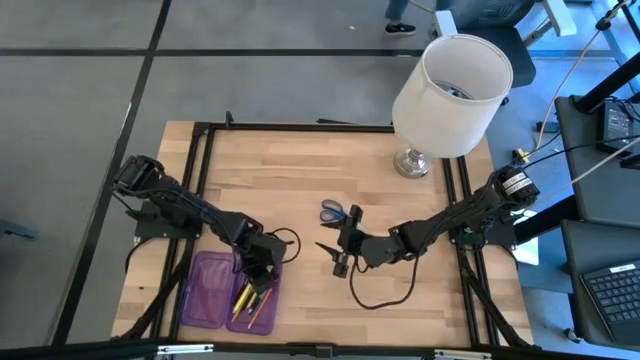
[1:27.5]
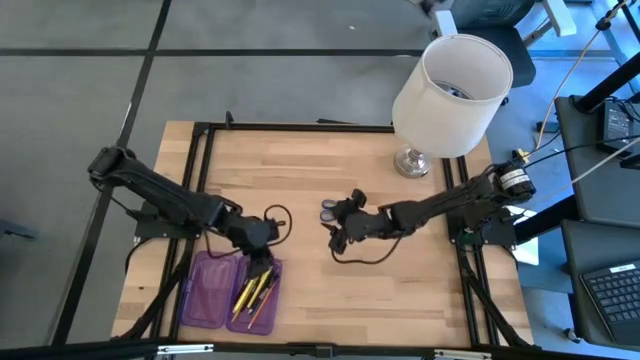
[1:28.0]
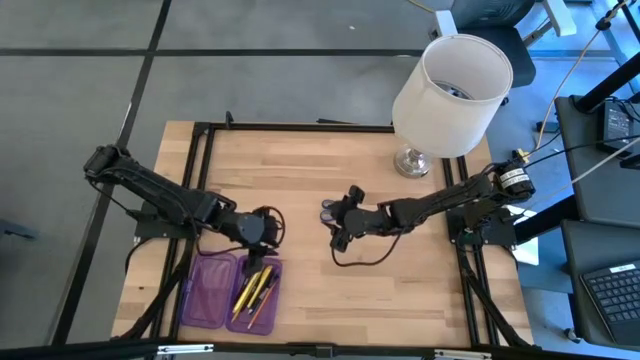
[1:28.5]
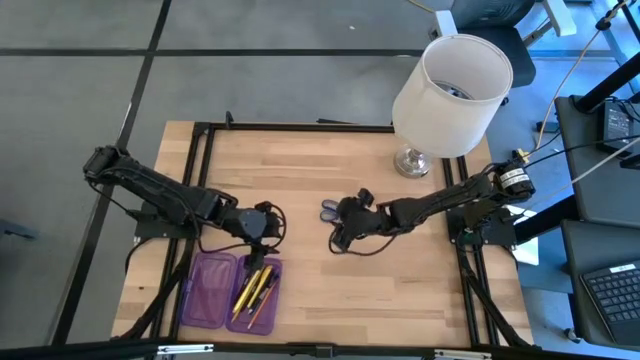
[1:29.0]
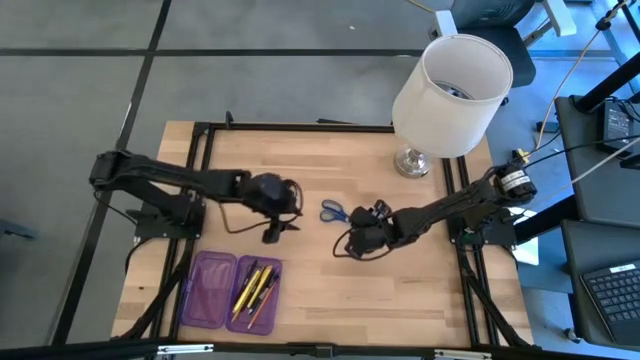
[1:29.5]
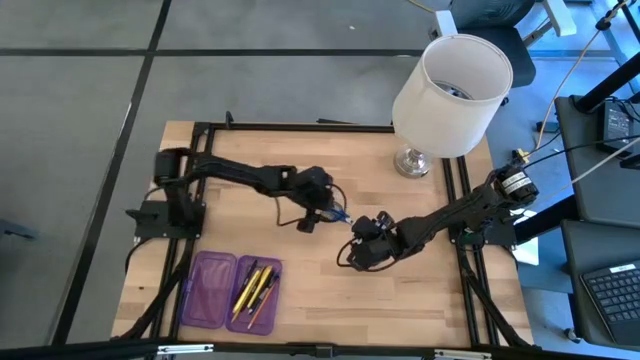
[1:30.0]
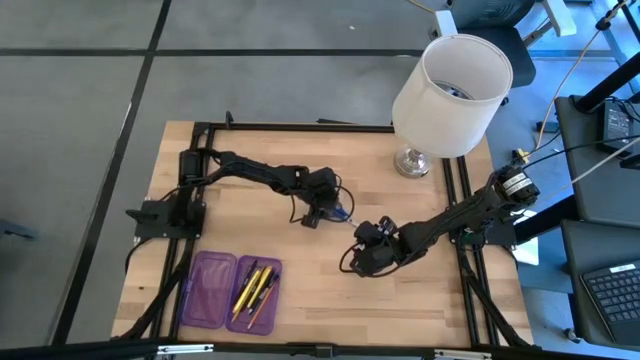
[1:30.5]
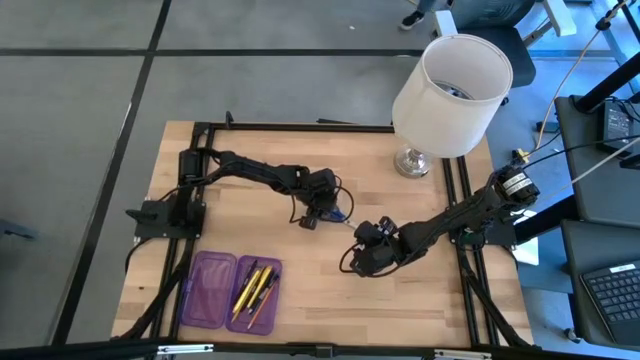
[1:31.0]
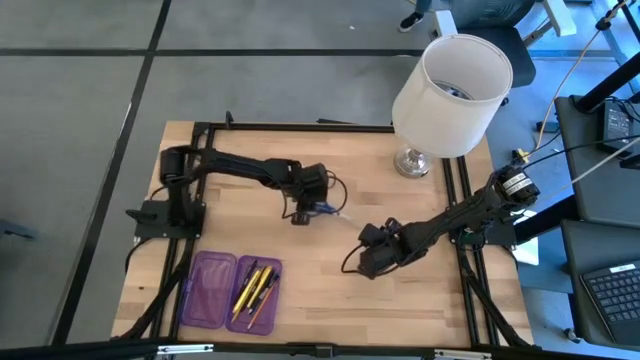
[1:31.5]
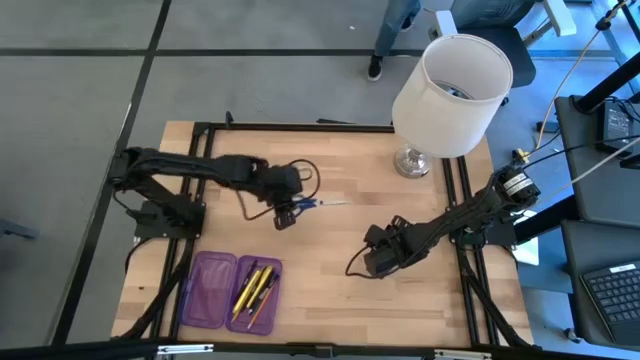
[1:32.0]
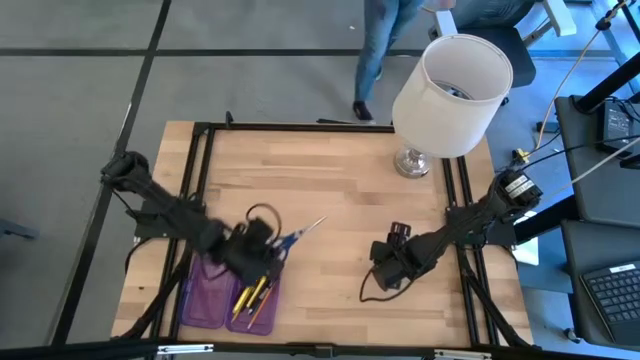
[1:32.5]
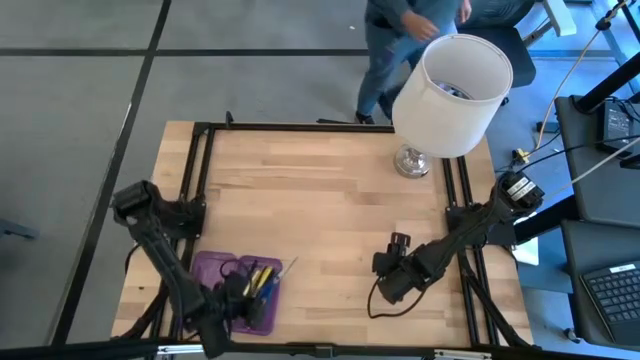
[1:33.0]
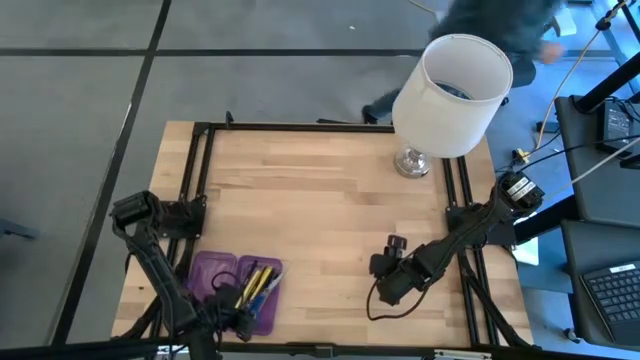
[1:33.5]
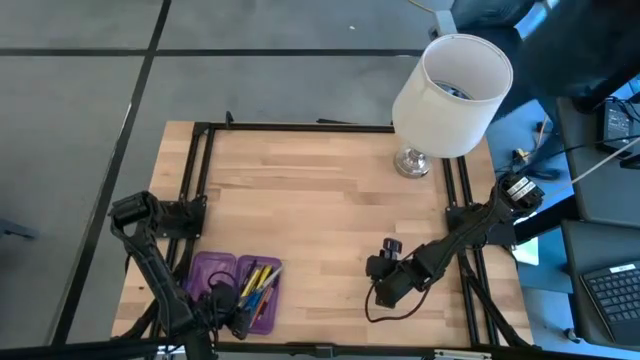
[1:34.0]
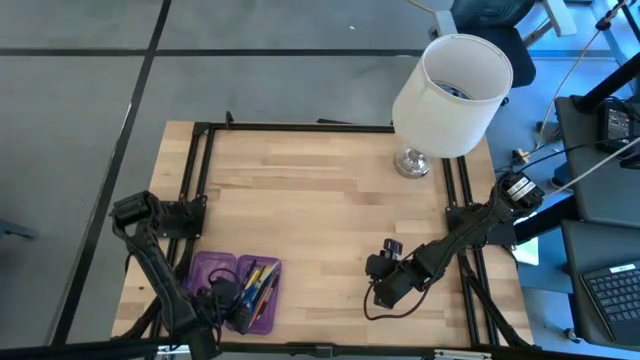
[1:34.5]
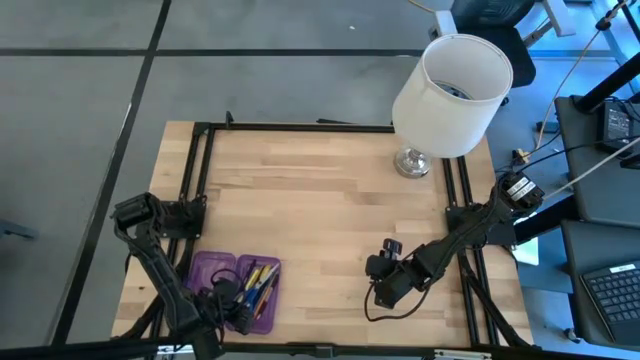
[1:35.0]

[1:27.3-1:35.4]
Task: Pick & place school supplies into a supply box
Put the blue scissors into the violet box

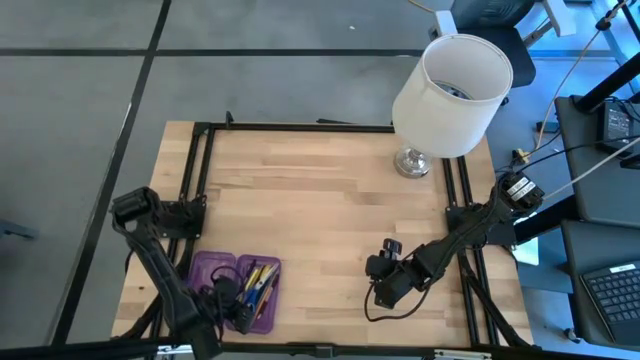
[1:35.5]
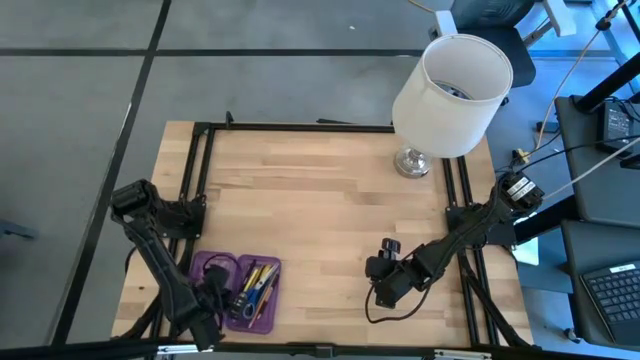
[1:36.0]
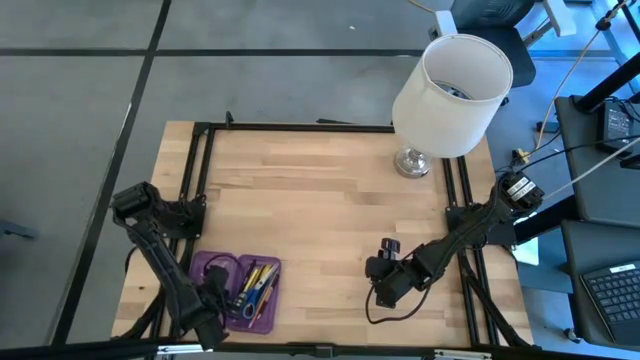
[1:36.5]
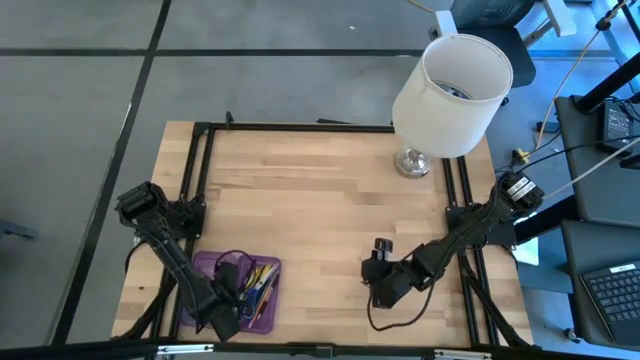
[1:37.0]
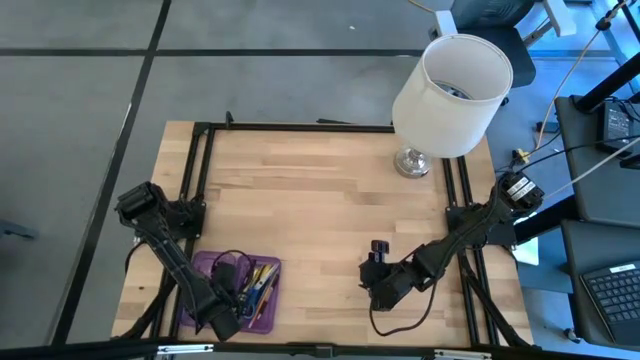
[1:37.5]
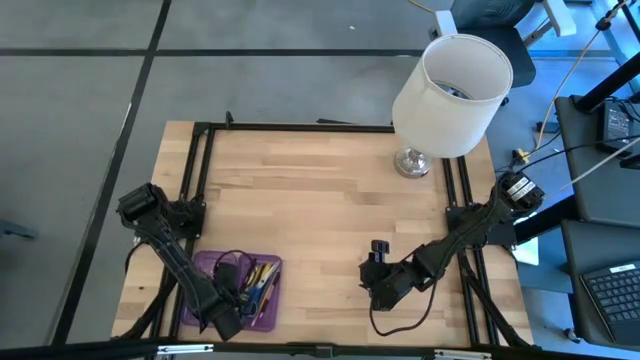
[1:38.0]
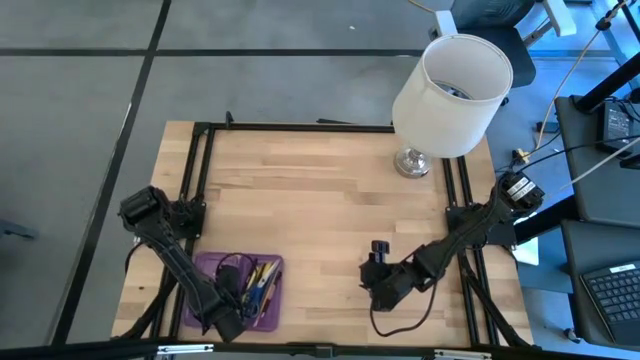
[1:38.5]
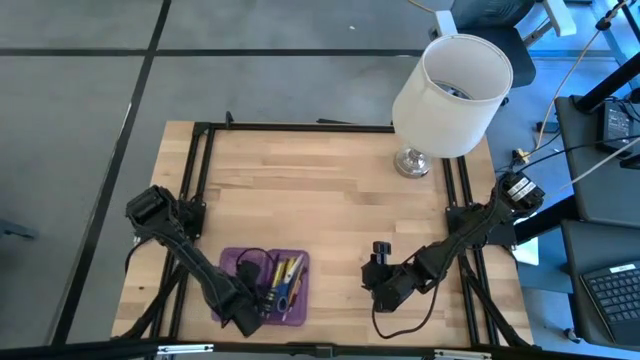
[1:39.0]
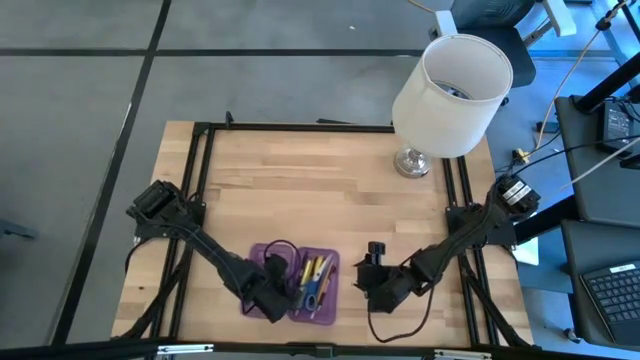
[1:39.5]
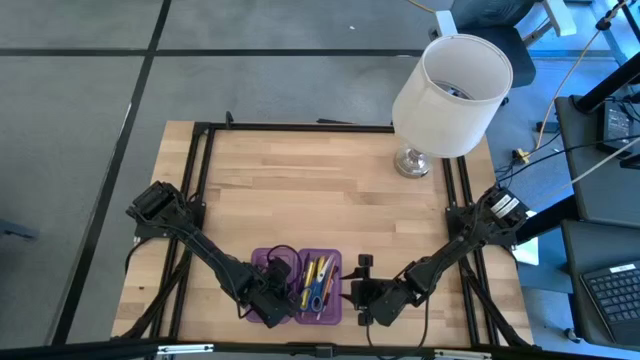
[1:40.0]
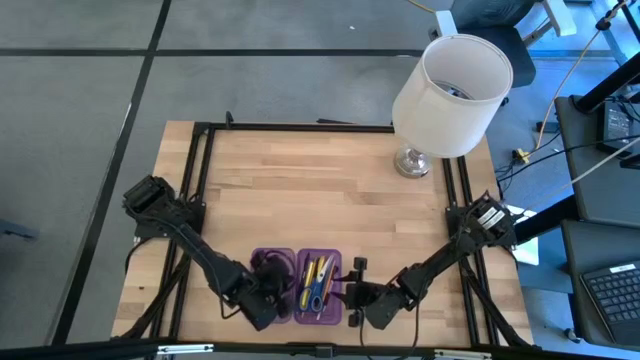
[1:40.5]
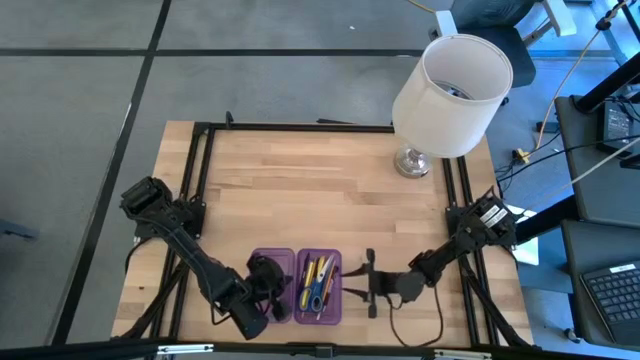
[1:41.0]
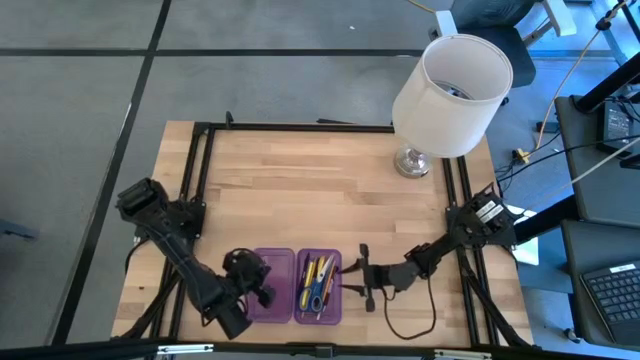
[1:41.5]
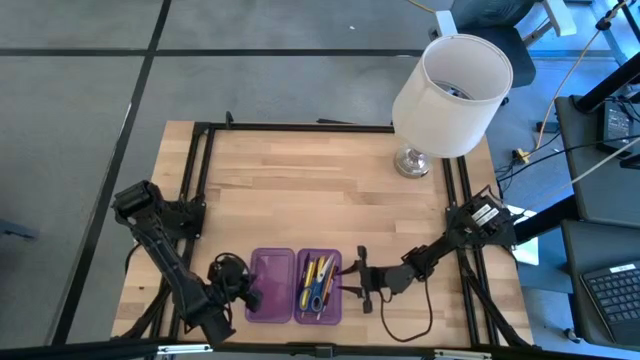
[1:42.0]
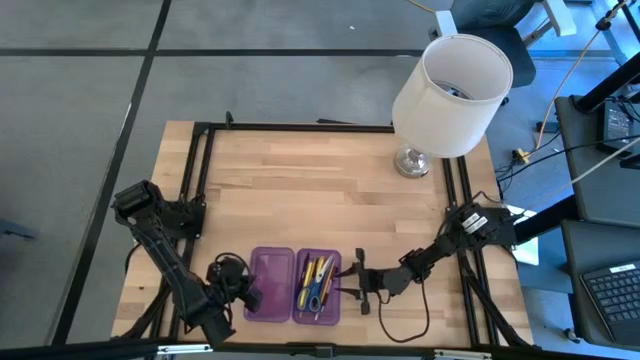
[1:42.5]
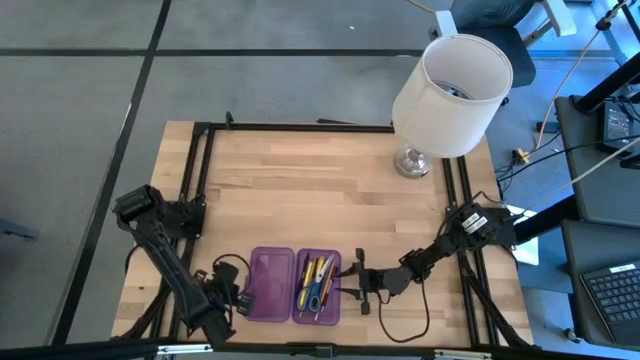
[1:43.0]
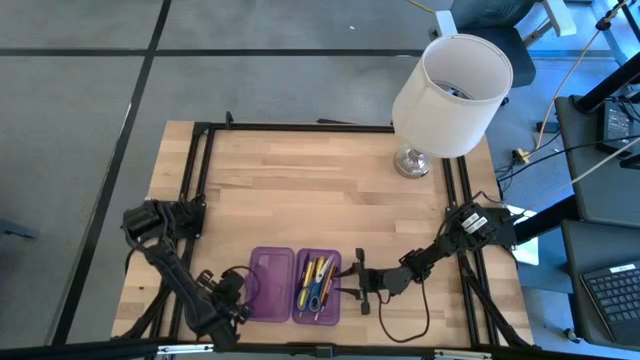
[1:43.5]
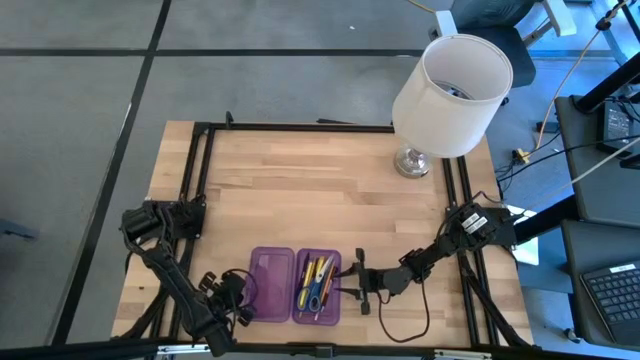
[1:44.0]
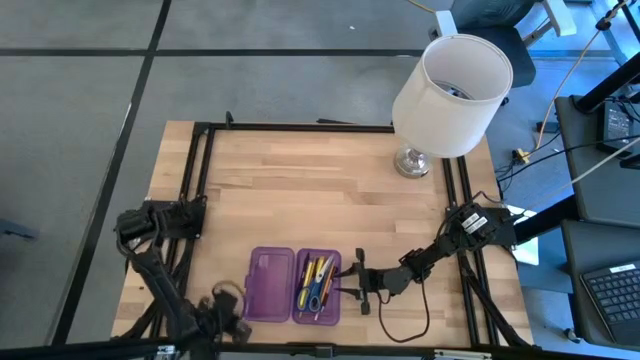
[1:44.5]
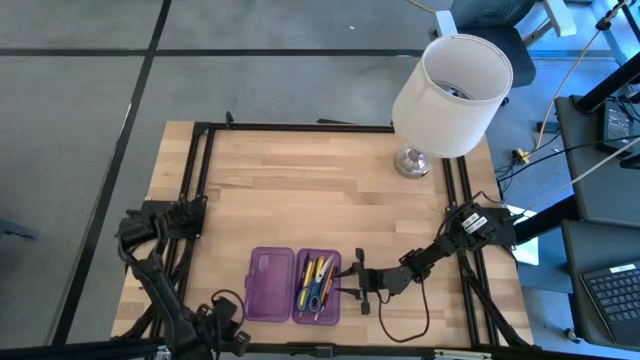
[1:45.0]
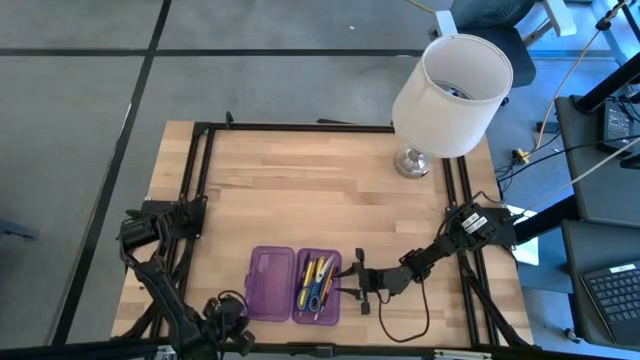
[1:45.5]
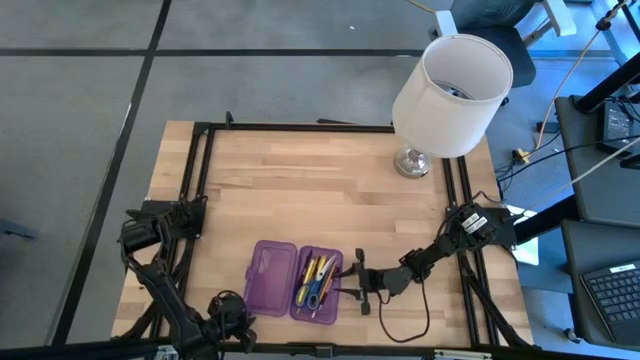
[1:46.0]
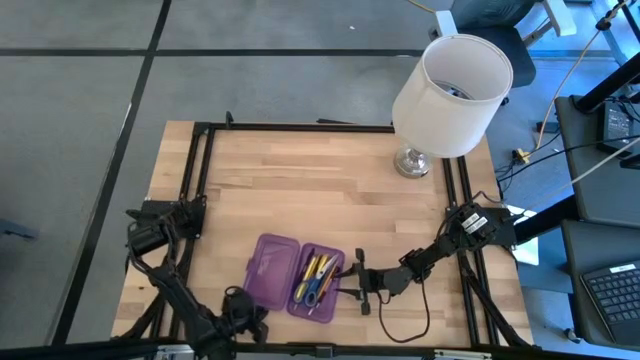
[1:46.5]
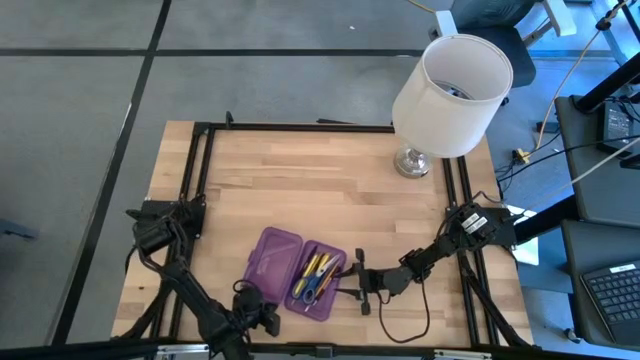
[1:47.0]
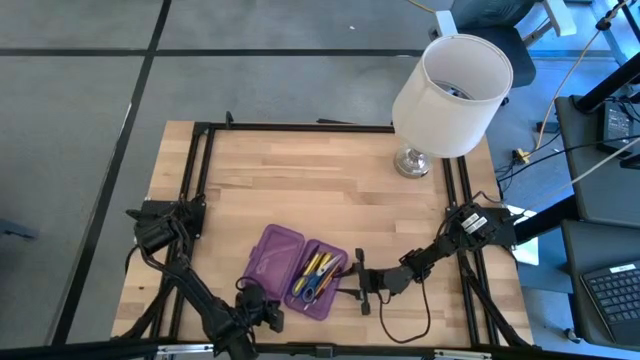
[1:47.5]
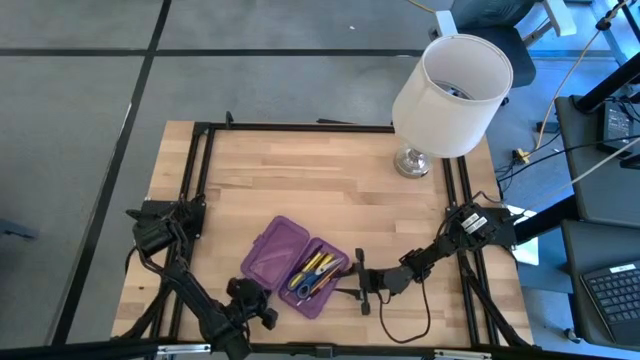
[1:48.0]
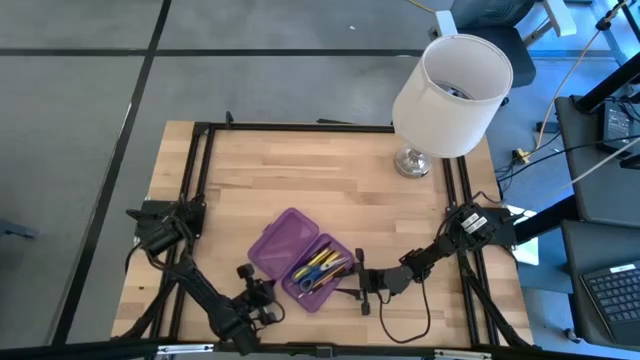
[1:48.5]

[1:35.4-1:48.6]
Close the violet box
